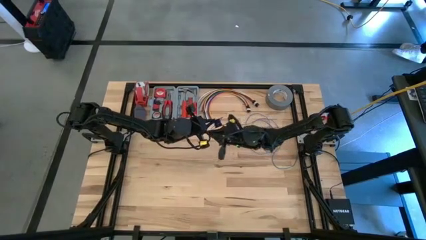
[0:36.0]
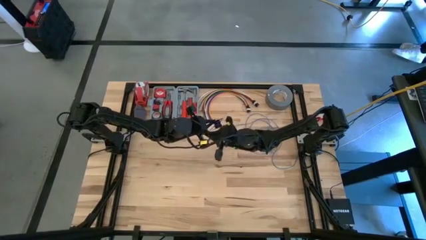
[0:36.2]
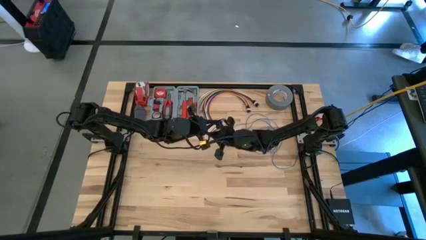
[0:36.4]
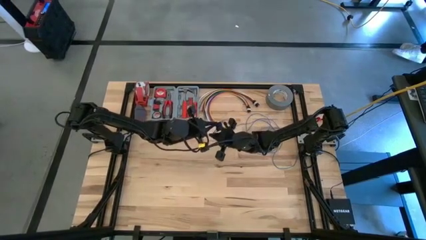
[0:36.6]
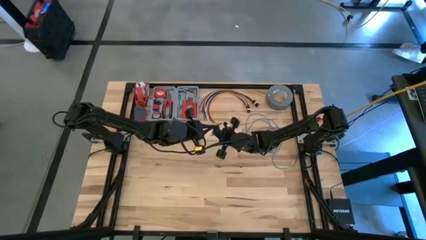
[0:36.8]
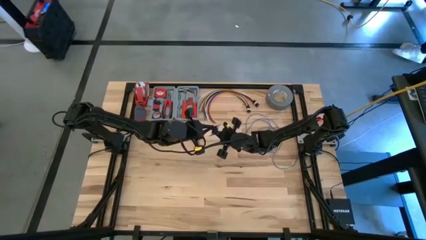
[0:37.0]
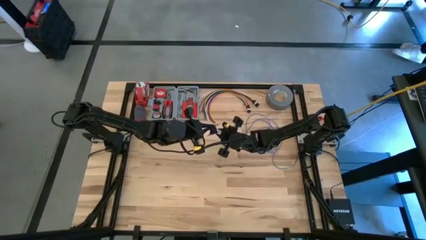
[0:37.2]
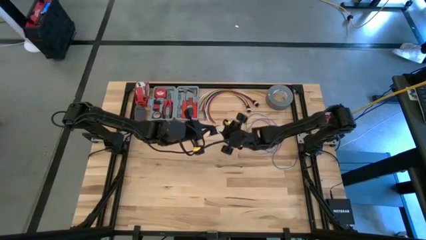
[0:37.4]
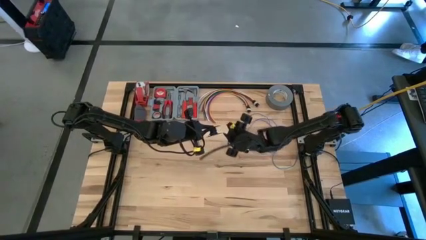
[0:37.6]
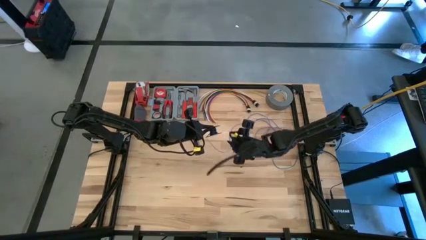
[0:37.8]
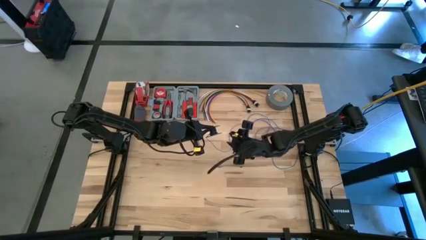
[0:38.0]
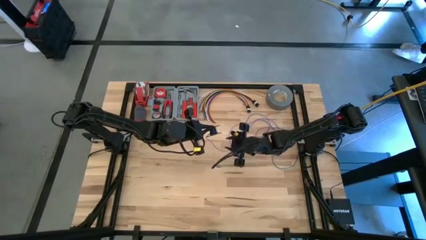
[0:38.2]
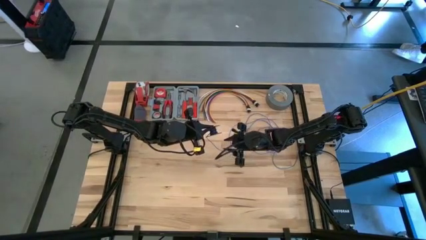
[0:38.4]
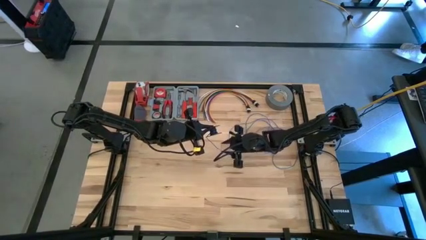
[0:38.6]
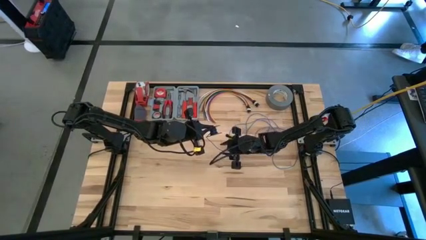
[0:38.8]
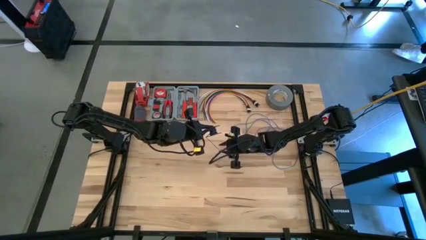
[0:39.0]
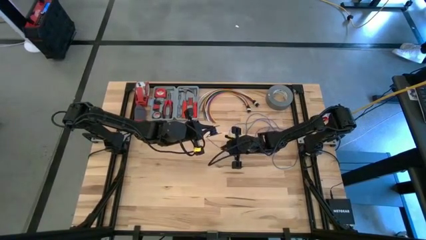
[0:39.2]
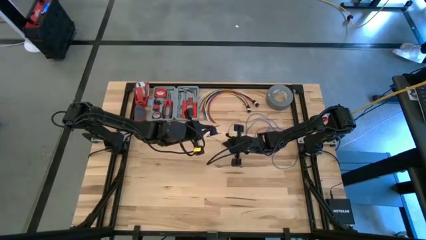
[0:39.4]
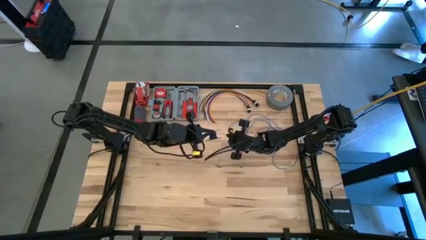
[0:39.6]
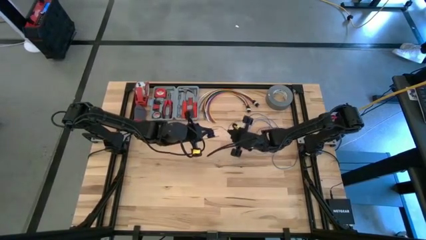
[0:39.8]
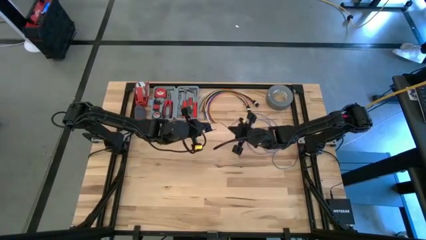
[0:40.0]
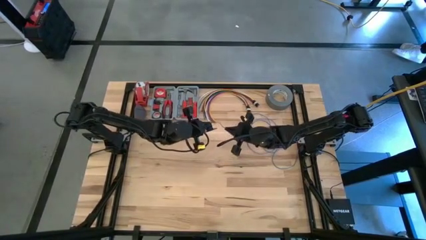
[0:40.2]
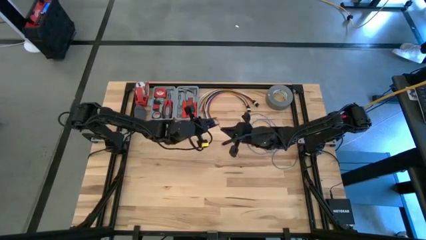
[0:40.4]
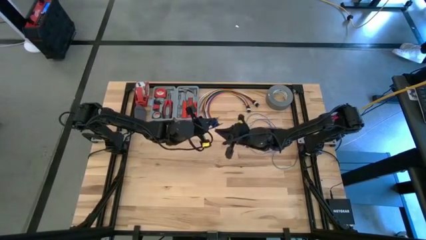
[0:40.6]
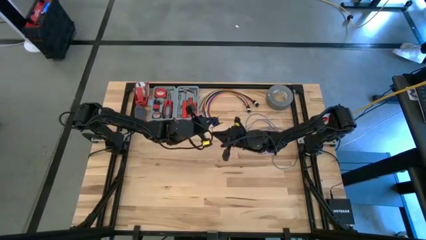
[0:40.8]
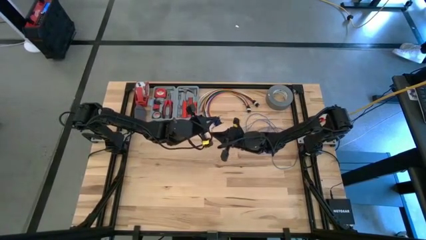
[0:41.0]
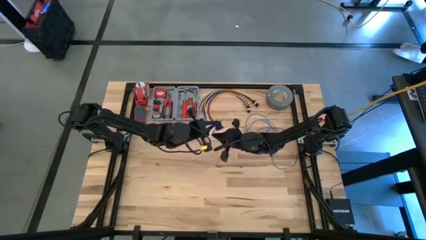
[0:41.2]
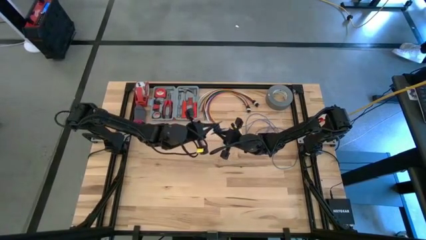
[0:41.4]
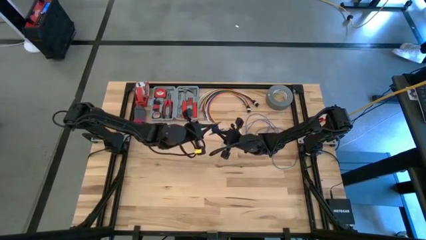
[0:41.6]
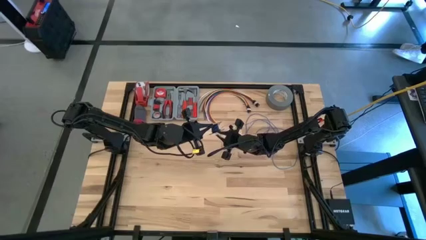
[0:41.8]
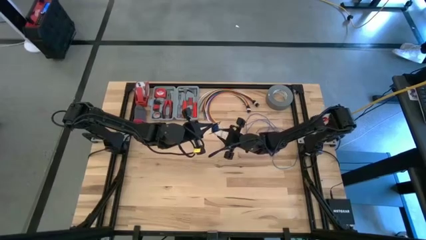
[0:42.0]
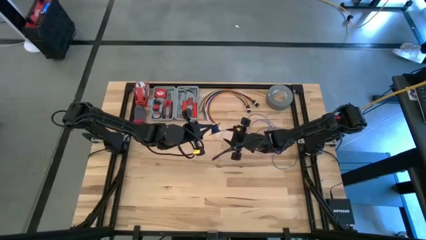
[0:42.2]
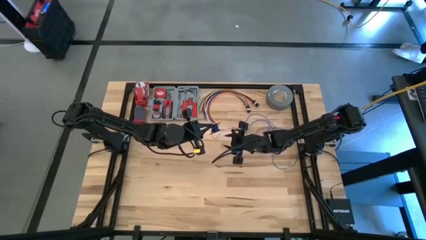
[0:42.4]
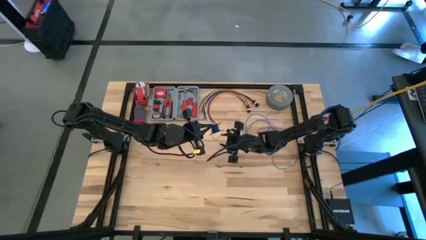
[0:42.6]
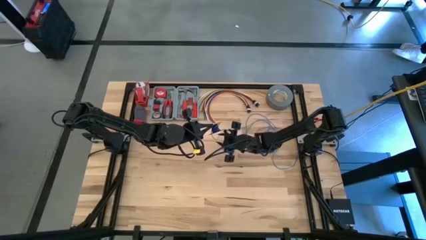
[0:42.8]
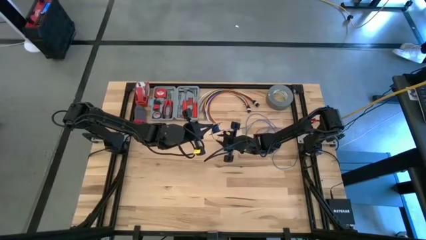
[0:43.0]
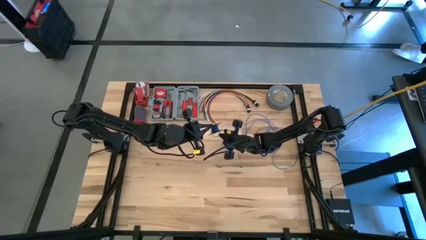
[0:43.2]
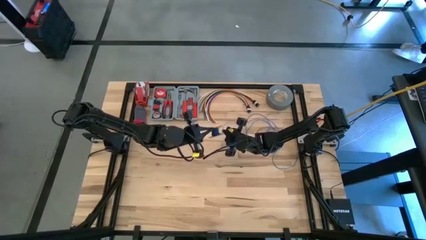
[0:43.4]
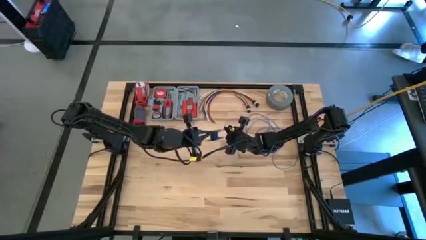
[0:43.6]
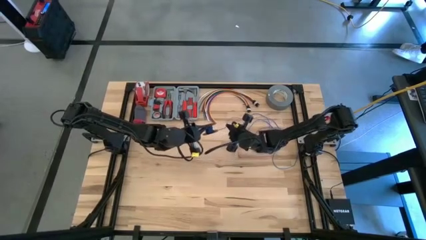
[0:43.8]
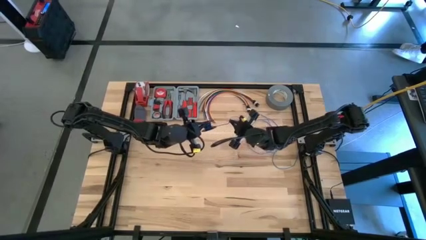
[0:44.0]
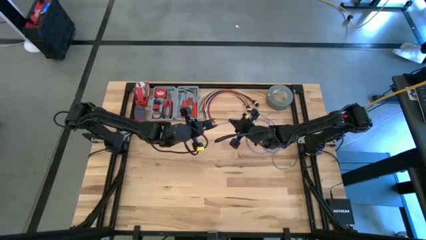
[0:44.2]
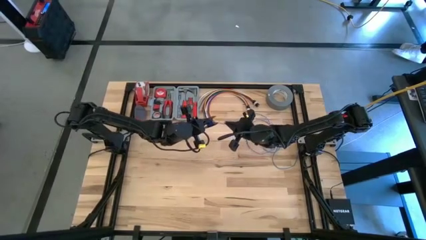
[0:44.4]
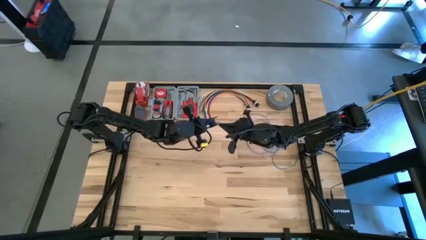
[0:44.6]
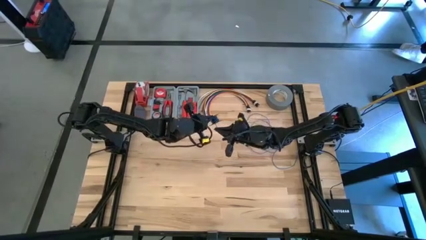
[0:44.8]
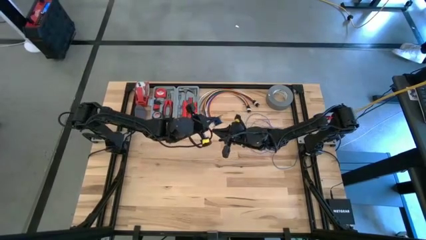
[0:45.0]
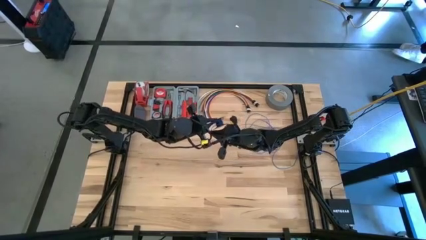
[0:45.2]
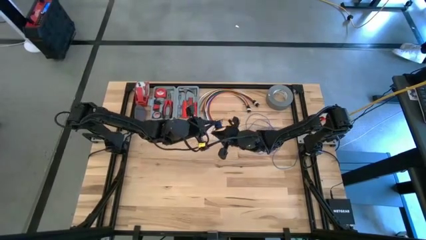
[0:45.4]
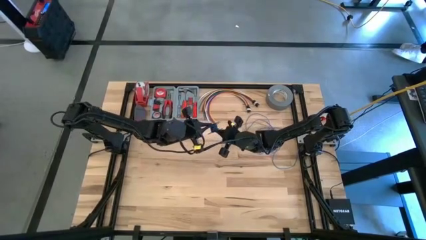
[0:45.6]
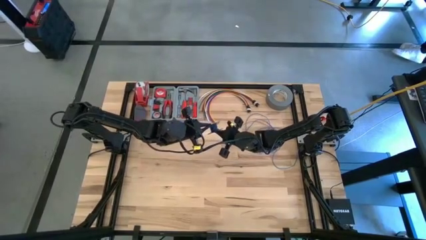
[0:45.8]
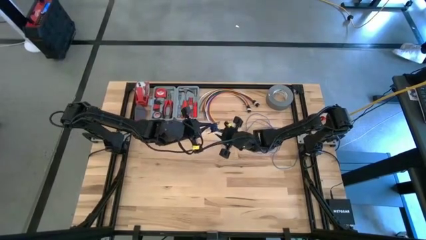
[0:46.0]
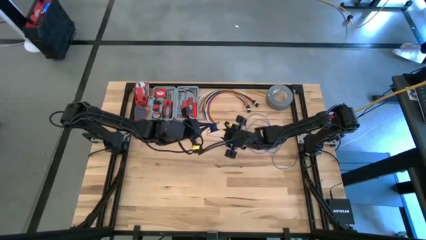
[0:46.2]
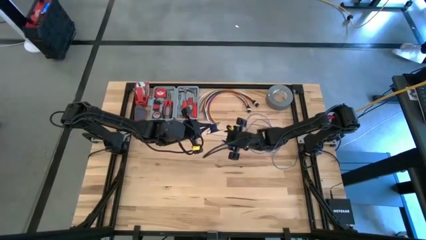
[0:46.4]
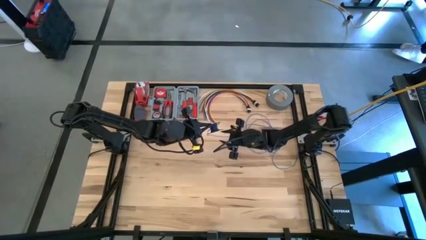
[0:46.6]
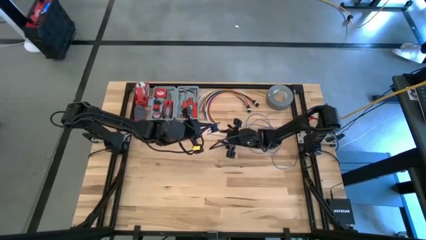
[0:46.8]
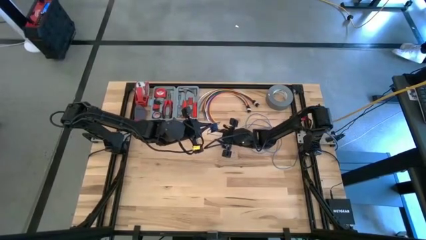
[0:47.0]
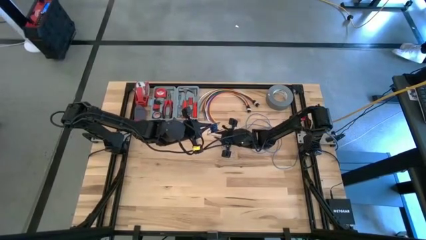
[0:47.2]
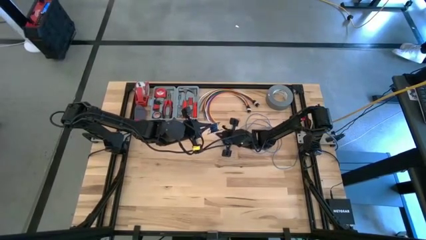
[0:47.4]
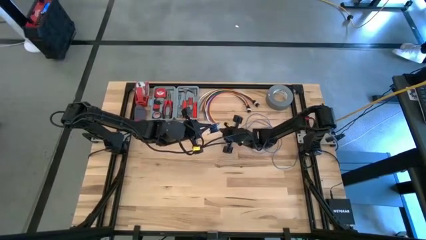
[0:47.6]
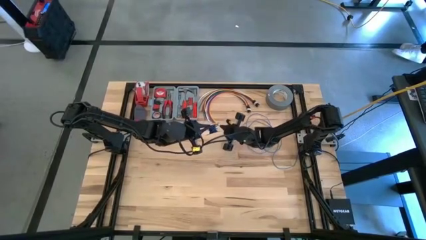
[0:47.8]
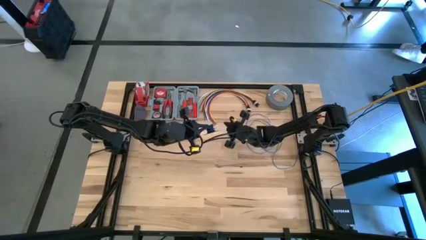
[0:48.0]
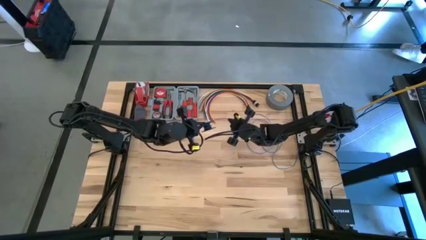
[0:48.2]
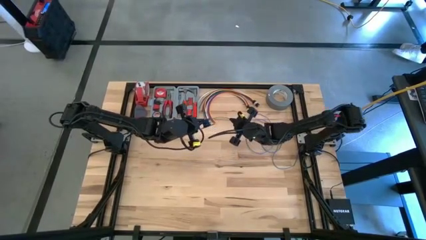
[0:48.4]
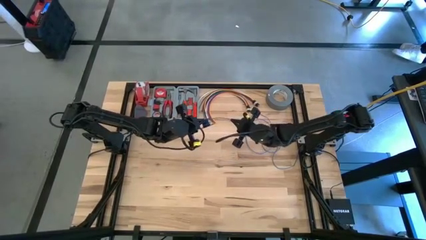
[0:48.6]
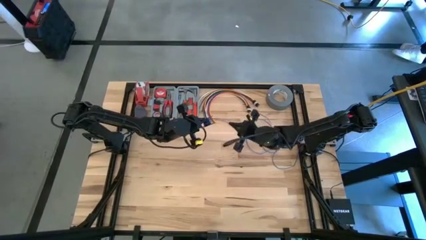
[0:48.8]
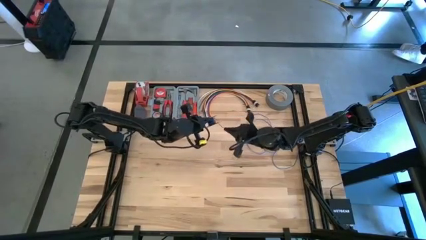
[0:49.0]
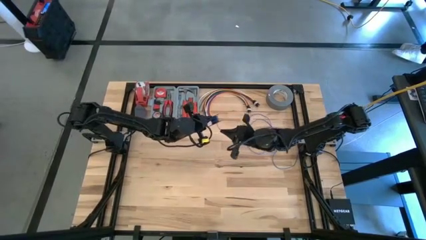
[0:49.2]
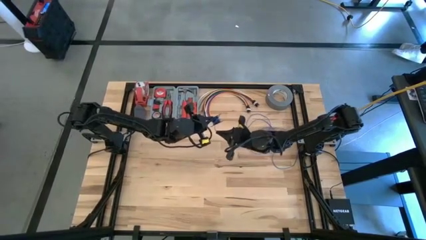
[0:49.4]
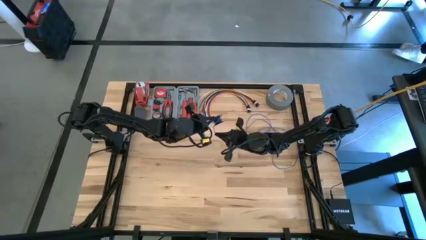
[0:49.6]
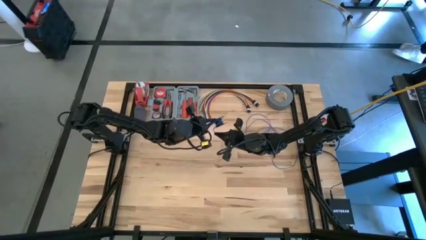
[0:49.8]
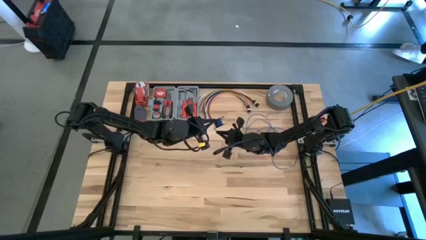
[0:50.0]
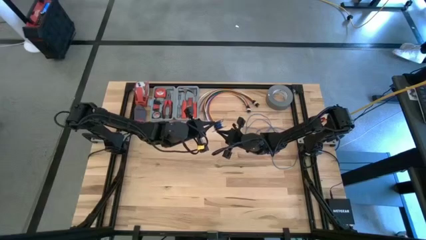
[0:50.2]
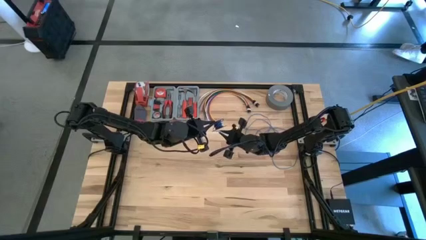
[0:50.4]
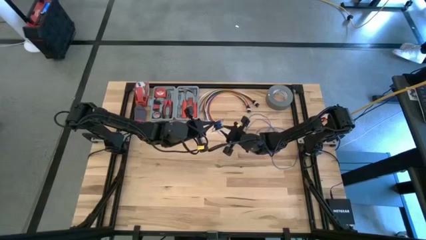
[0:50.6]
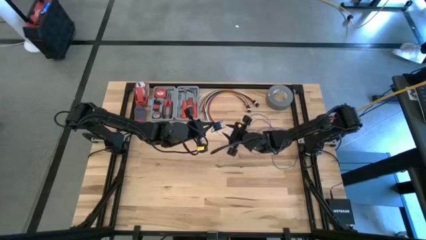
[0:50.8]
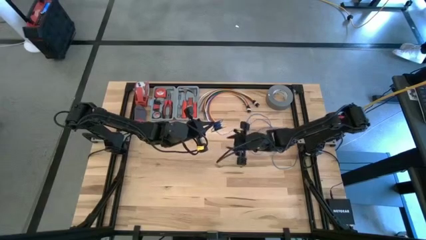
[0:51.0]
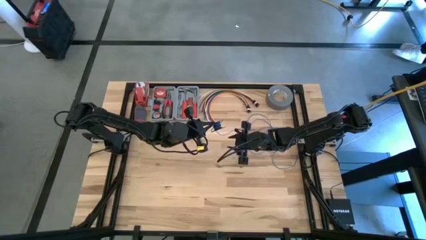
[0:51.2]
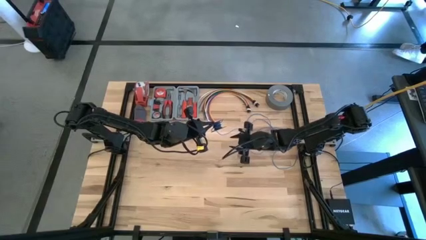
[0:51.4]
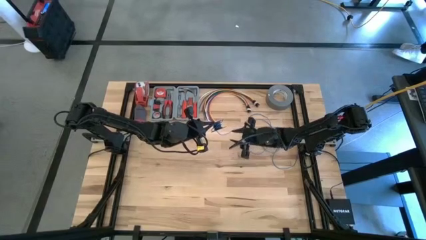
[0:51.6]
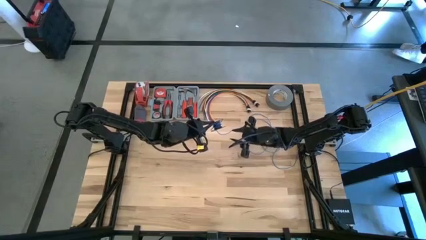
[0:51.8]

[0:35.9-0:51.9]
Task: Coil cords
Coil the blue wire onto the black spool
